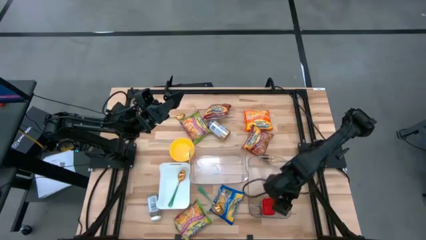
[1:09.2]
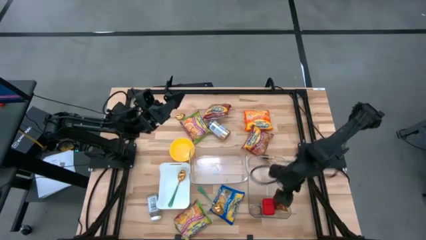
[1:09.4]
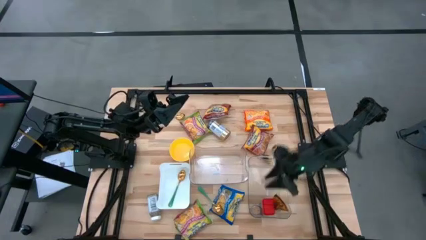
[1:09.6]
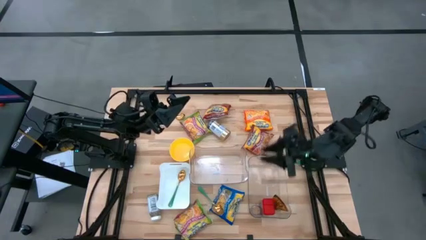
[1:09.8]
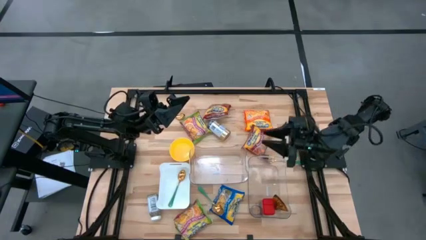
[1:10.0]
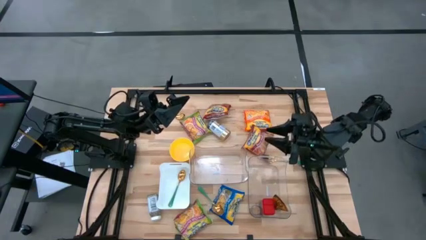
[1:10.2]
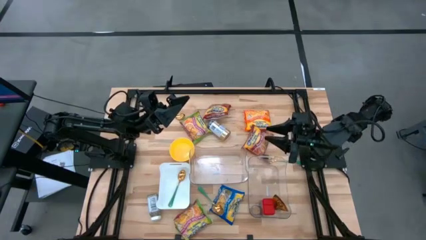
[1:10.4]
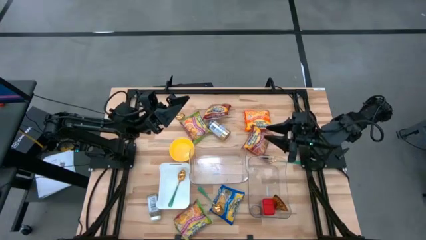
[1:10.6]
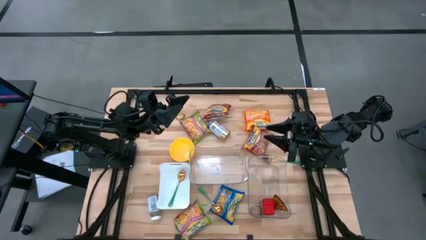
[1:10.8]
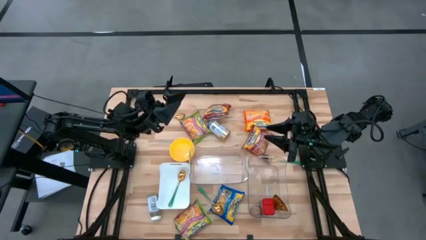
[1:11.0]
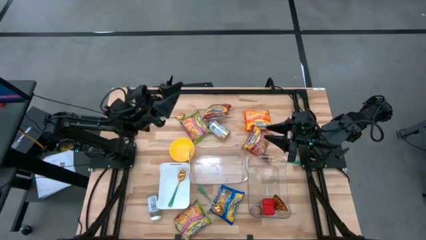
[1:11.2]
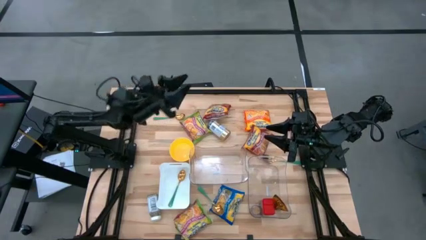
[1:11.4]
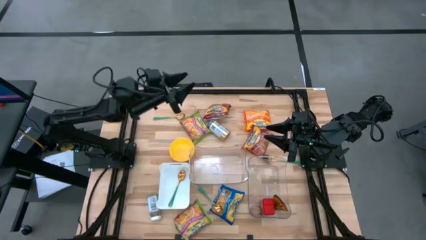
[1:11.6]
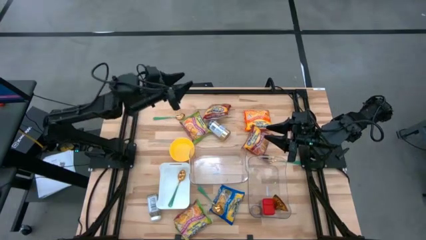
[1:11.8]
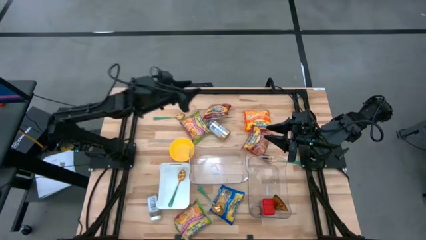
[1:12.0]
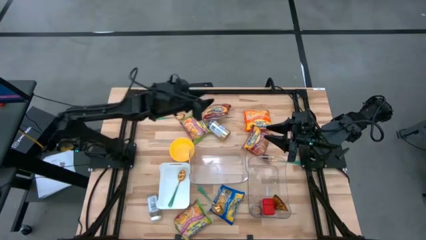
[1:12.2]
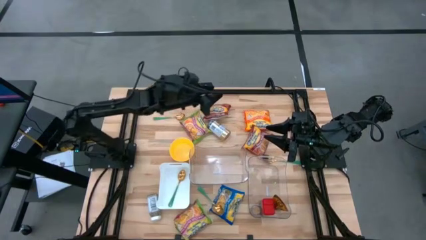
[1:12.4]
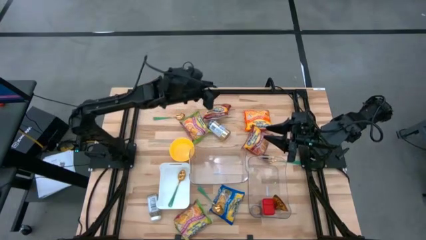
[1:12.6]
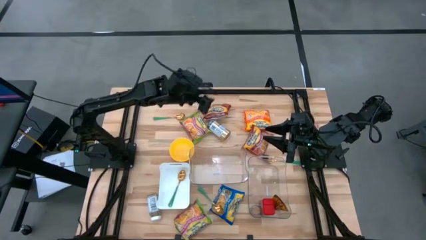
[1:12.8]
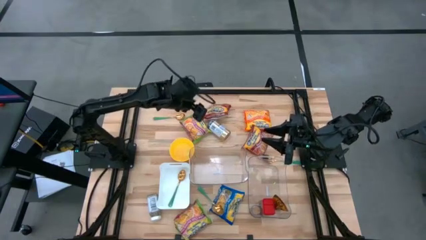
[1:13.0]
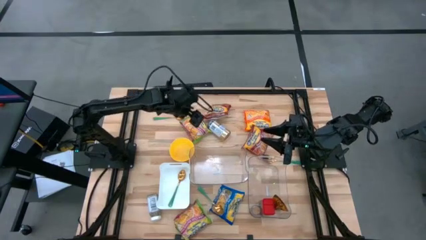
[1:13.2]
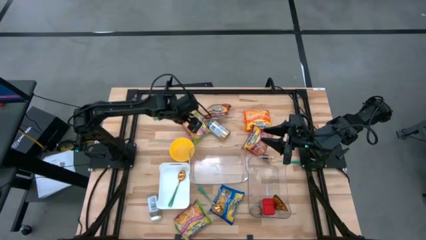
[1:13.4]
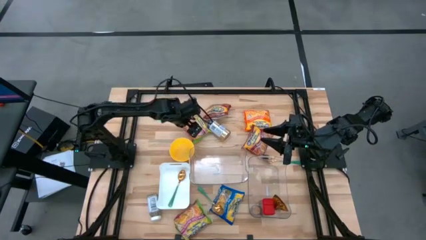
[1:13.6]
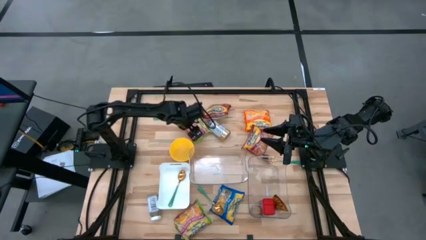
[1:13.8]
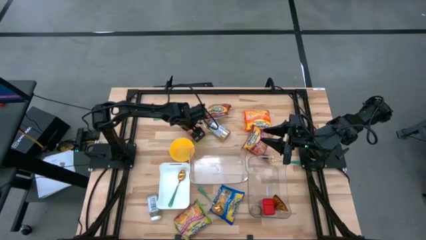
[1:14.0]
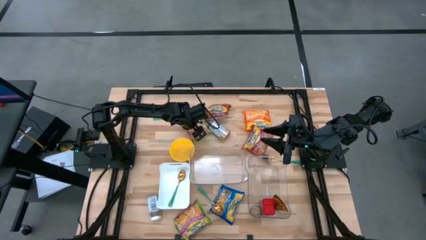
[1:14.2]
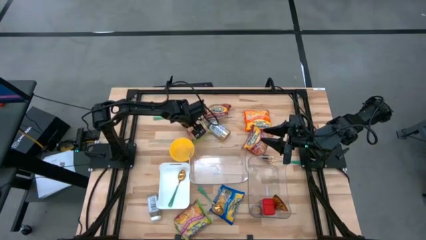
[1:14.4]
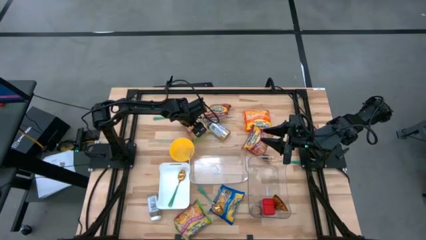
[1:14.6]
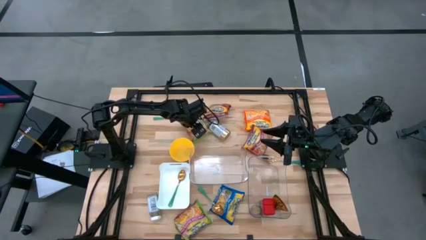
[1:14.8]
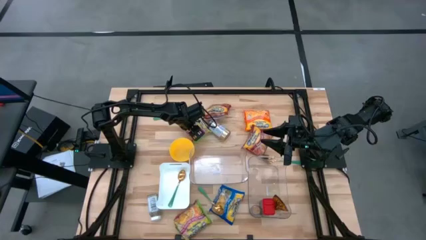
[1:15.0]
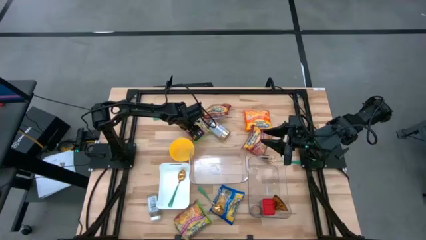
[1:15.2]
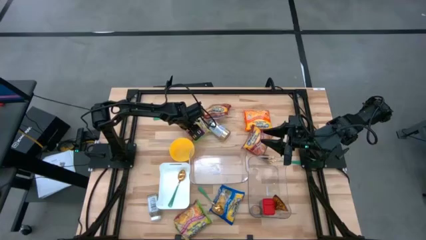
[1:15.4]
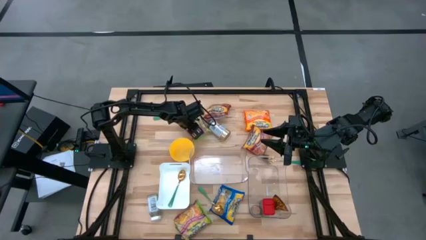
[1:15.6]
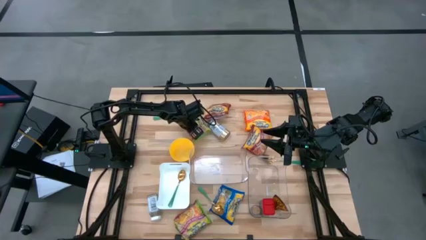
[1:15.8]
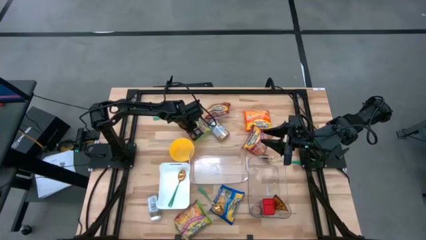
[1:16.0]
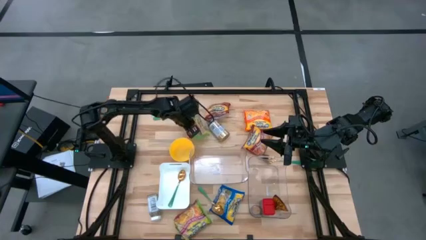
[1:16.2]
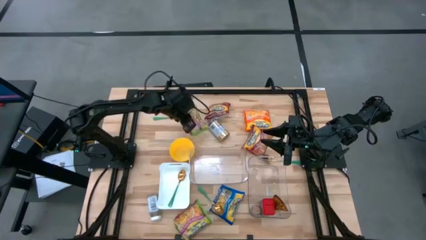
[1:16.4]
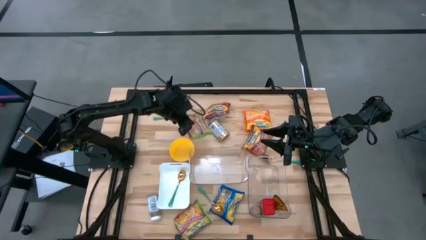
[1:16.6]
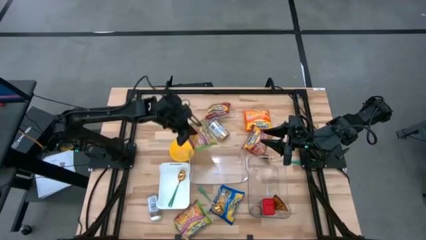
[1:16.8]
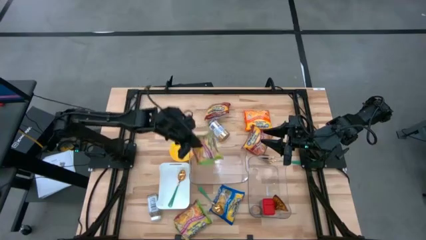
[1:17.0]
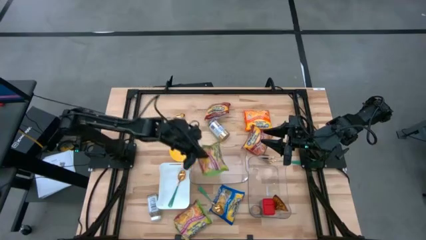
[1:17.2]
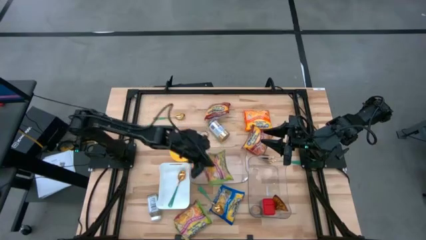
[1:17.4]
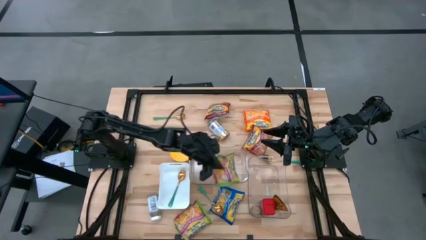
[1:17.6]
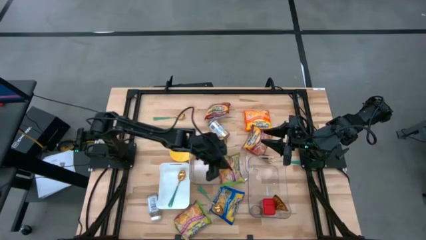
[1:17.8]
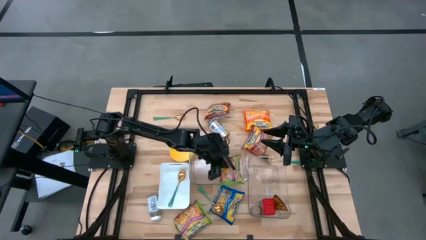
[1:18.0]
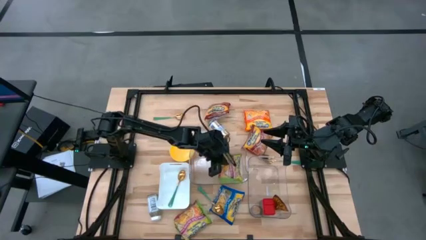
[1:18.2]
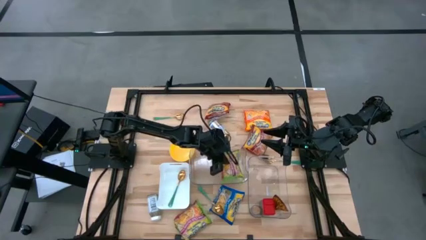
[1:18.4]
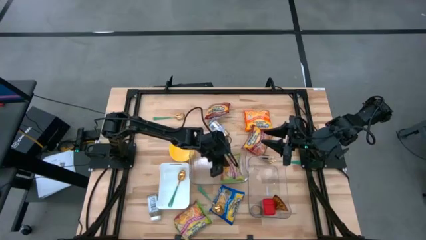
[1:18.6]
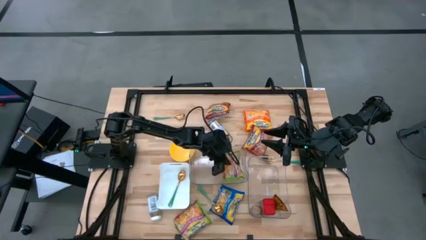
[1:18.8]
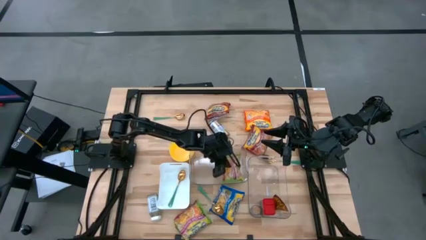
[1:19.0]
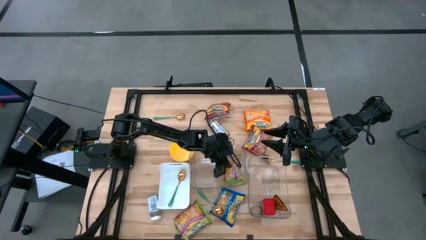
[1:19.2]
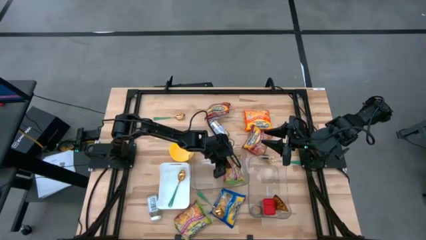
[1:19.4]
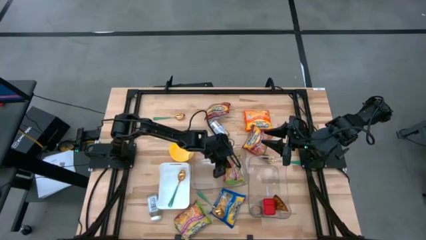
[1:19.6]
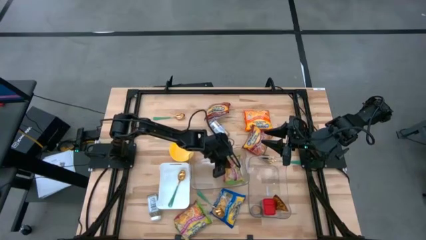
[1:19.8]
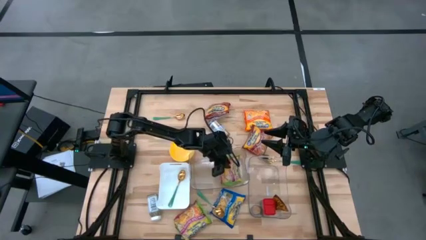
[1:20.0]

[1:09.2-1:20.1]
Task: Pick & Place Food Item
Put the green noodle pack into the left transparent bin

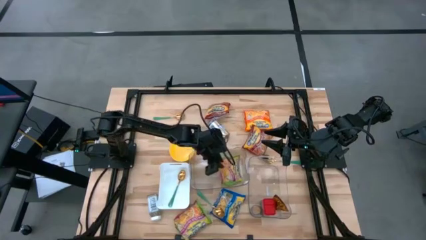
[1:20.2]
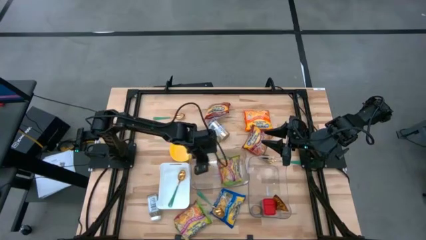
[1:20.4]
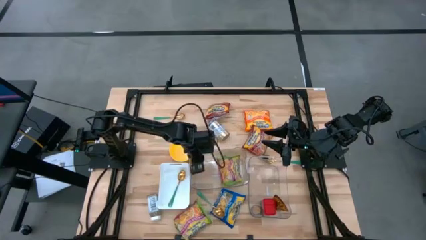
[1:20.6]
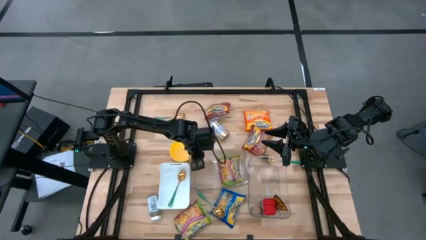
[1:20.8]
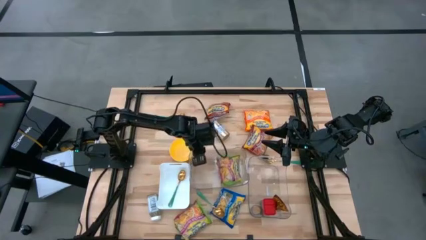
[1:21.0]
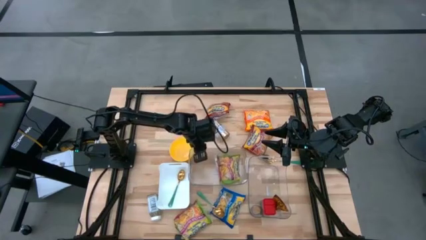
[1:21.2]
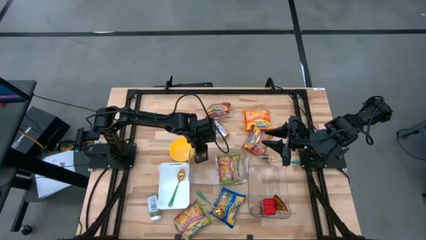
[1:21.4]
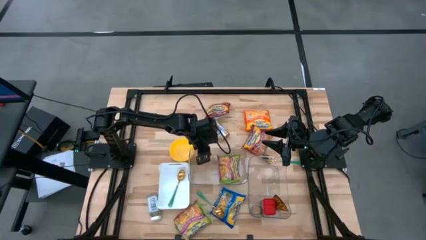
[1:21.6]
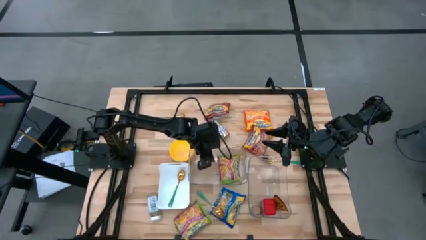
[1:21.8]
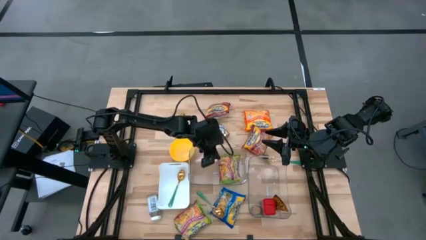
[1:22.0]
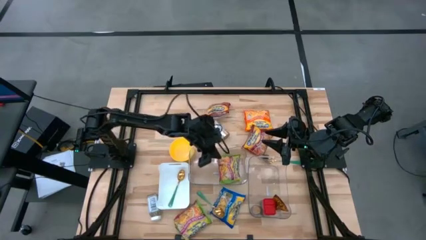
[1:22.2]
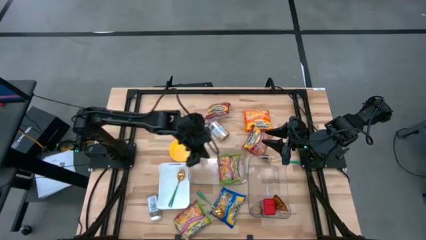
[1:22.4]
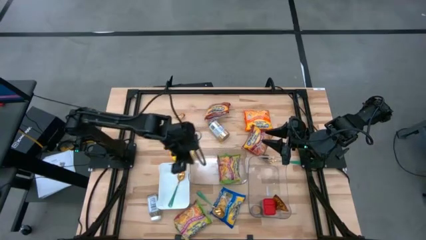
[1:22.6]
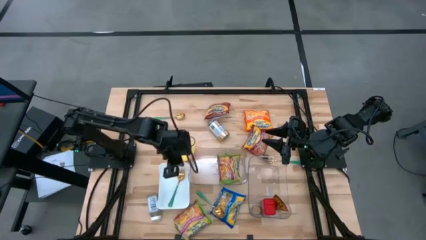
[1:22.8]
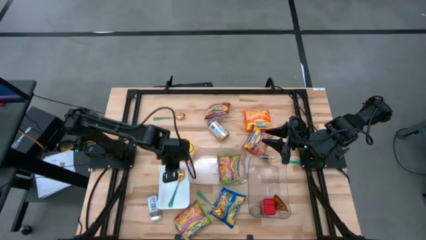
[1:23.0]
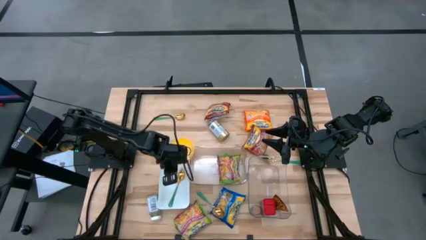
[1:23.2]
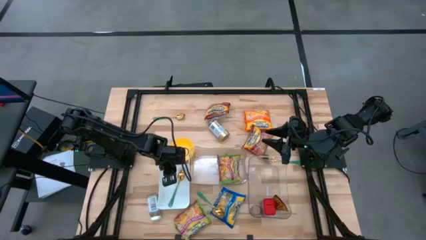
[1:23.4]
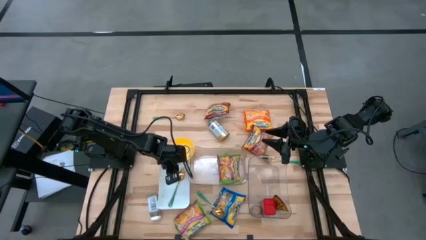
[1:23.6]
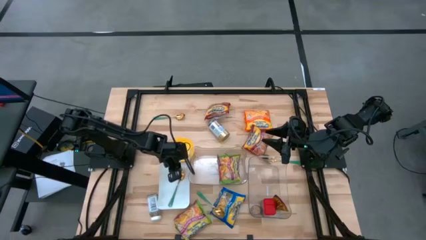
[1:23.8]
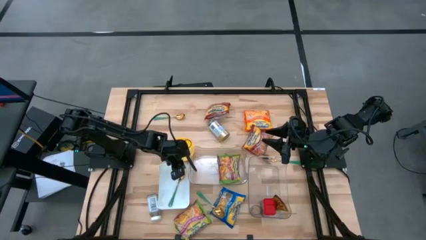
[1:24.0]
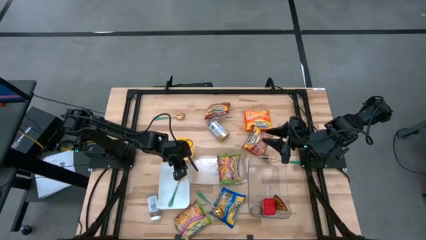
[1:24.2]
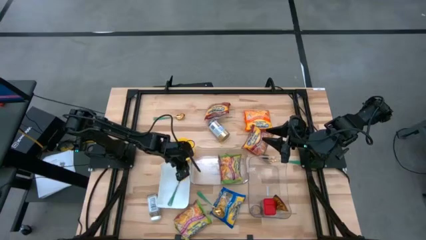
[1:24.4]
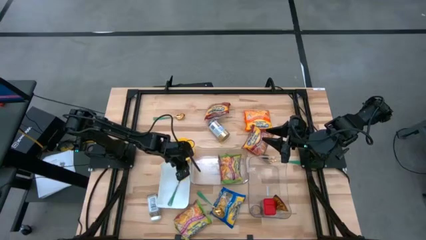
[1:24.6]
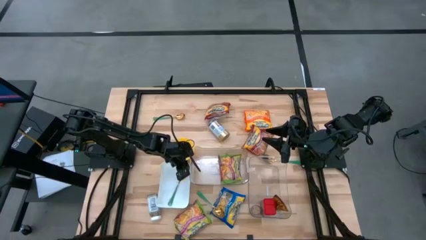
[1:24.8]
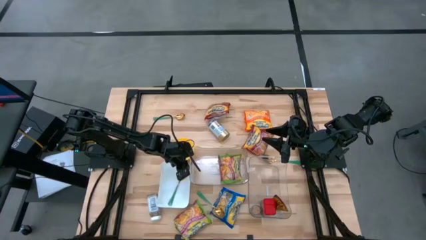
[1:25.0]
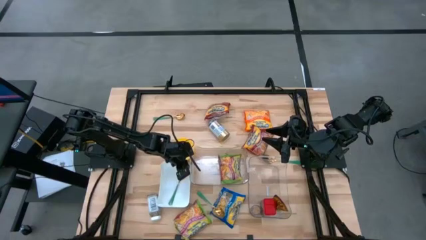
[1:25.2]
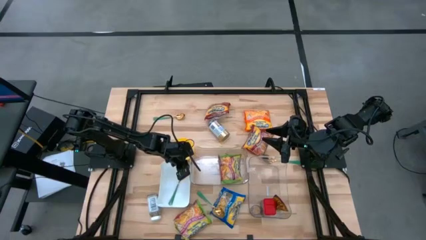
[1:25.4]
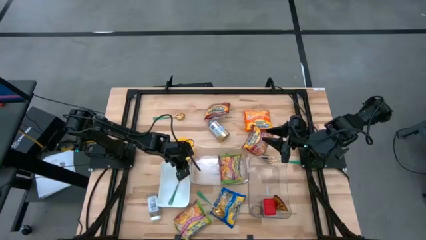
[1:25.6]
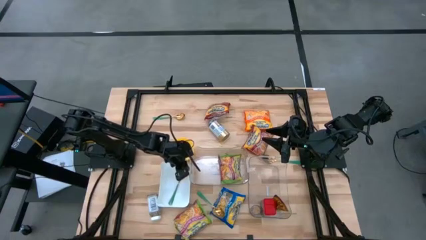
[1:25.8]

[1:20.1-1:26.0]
Adjust the bins
